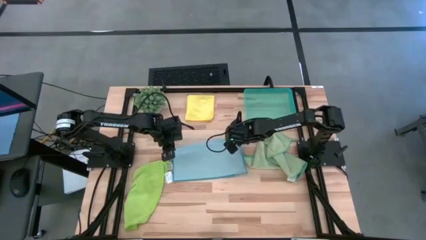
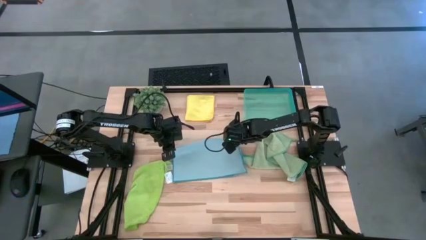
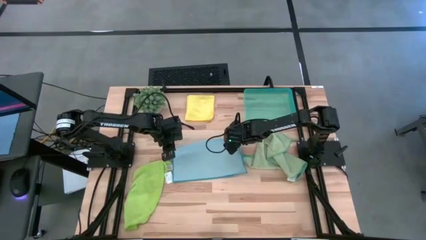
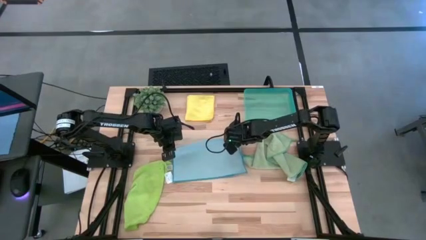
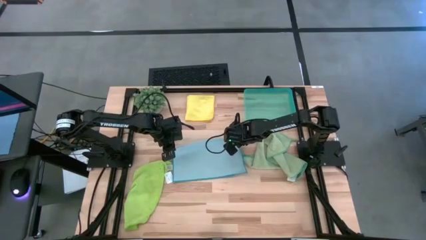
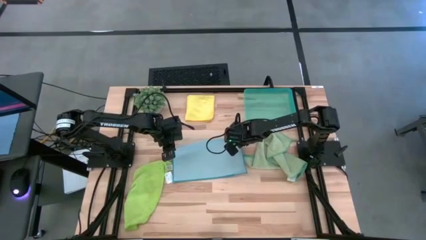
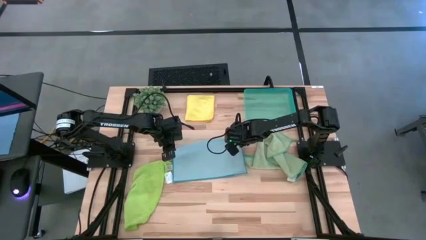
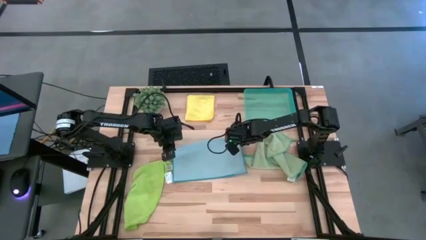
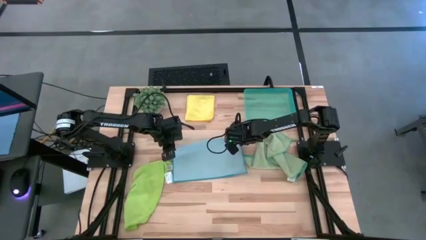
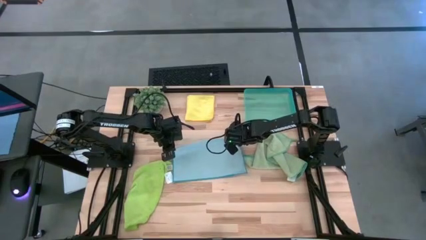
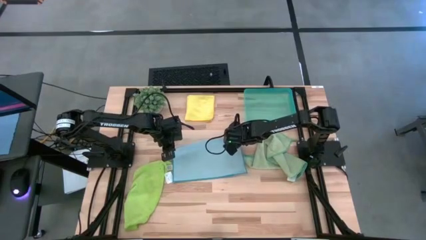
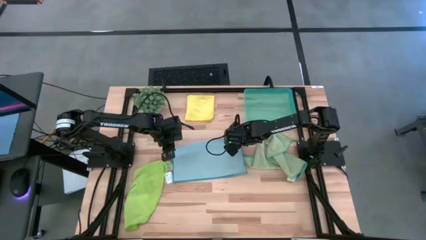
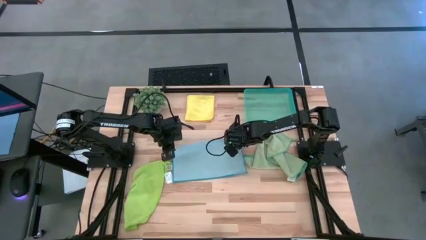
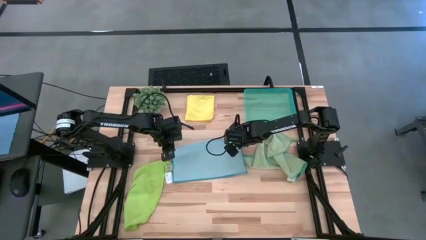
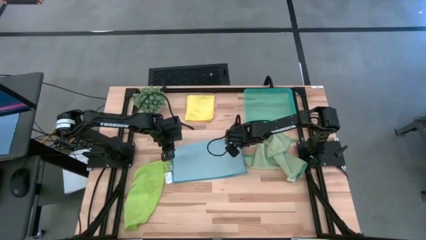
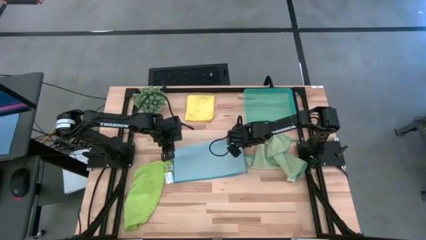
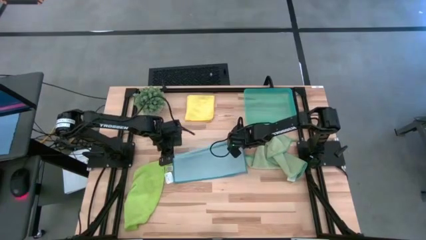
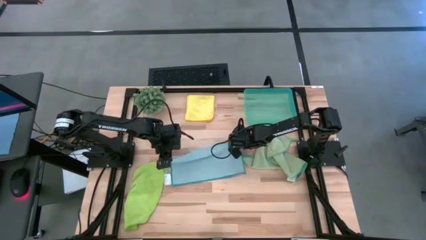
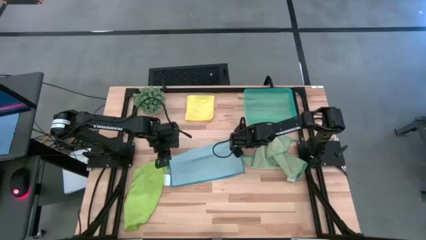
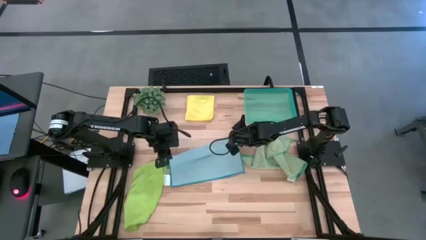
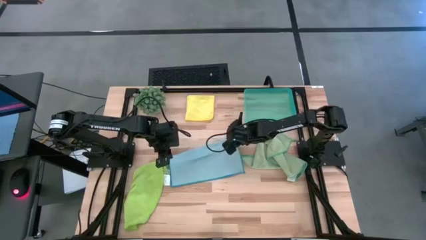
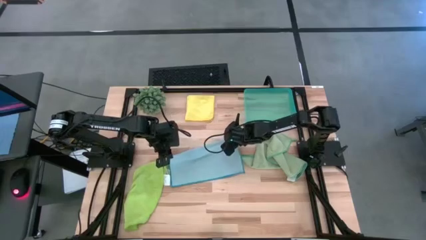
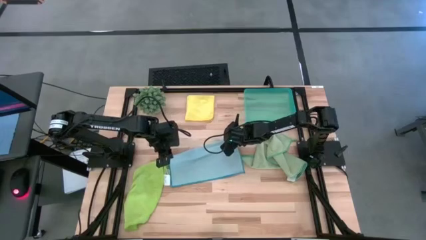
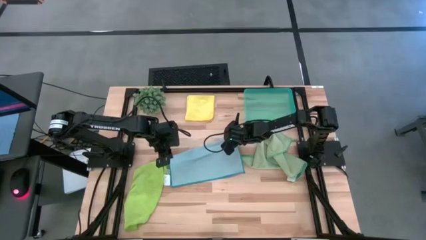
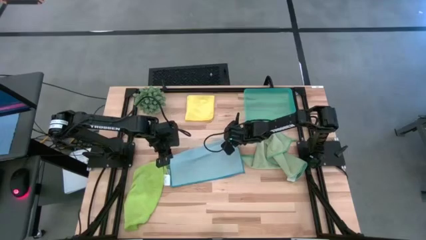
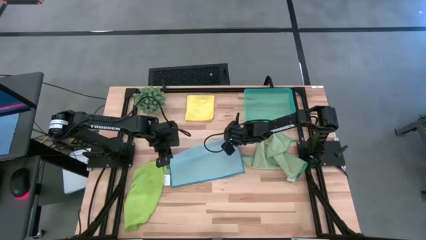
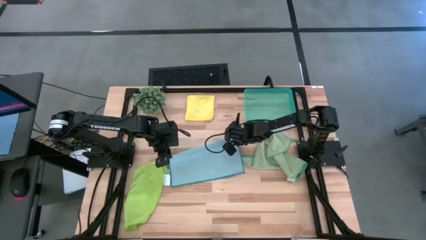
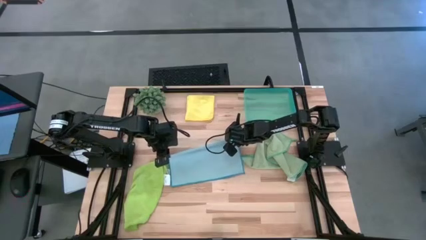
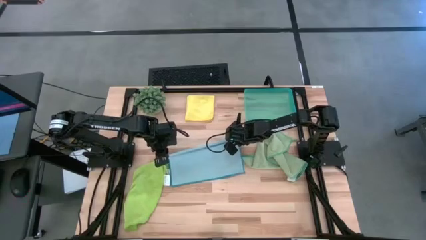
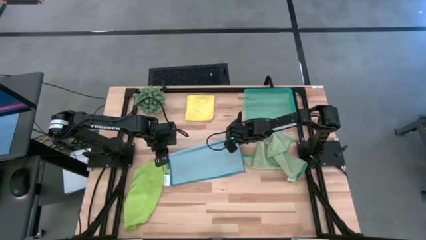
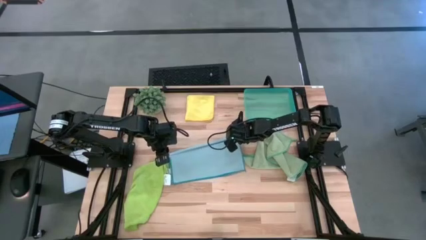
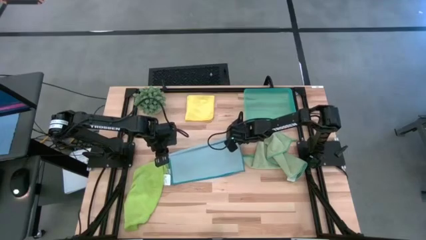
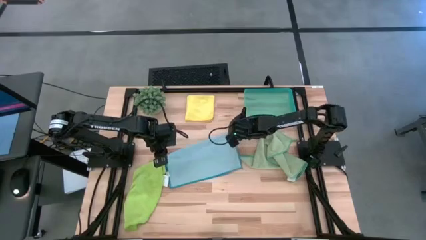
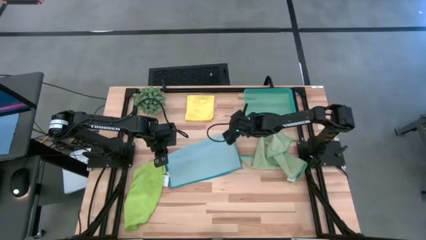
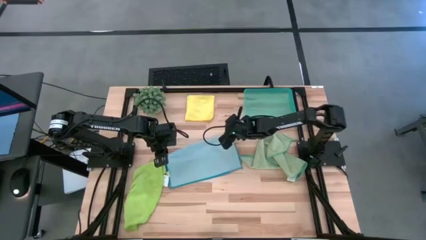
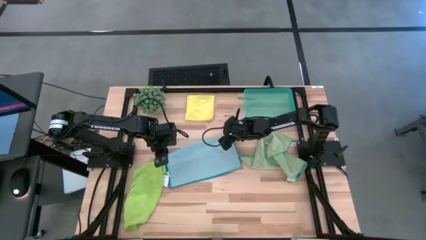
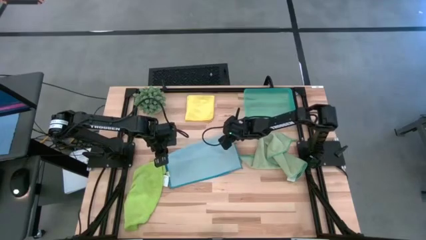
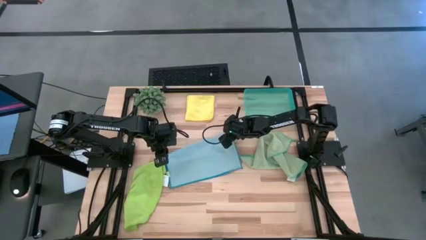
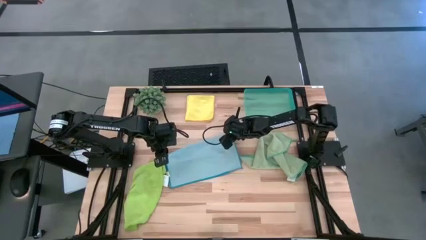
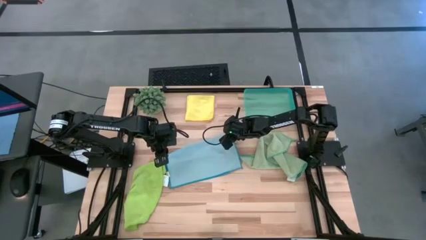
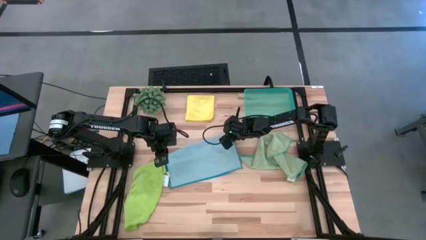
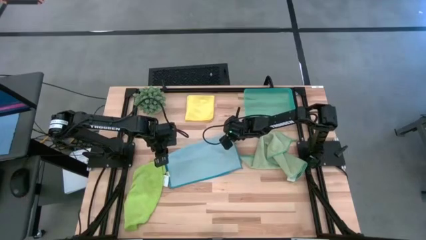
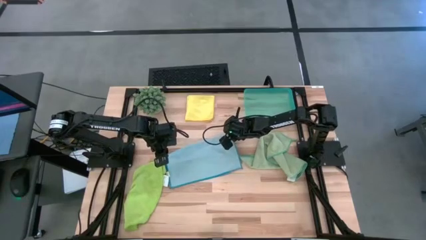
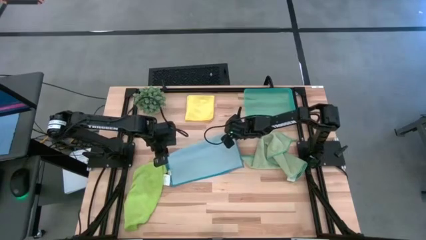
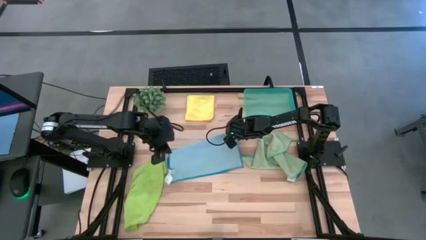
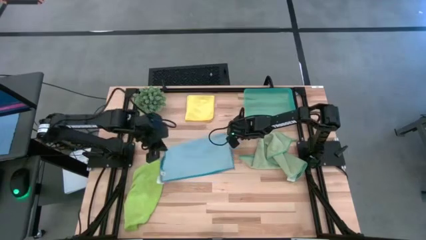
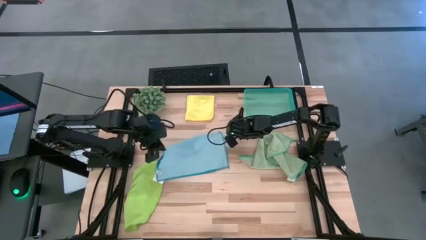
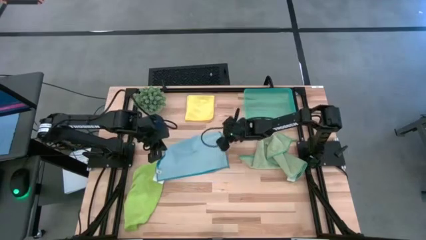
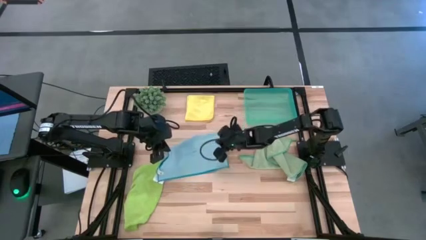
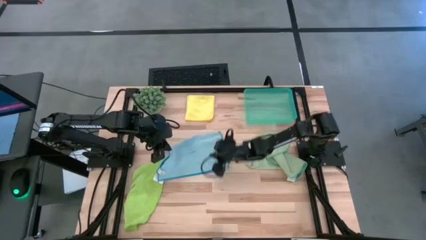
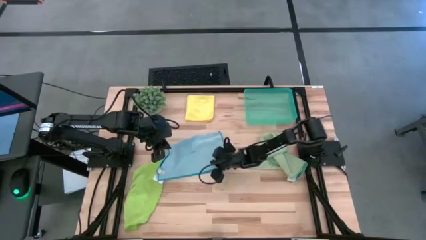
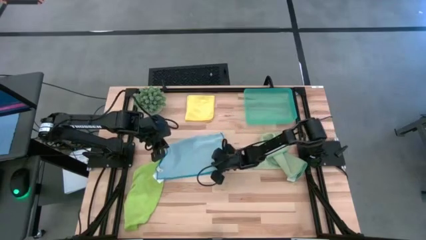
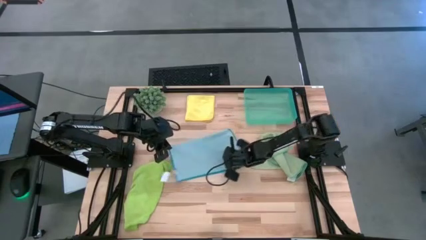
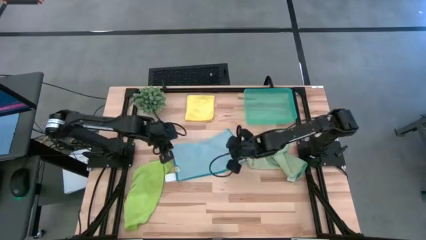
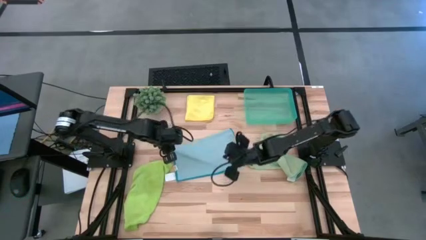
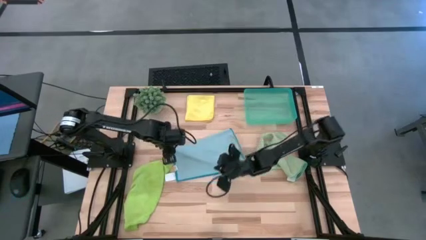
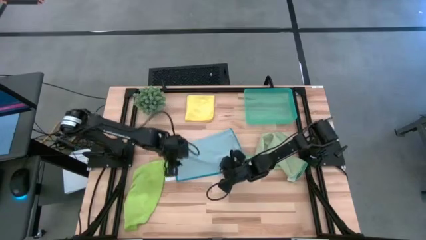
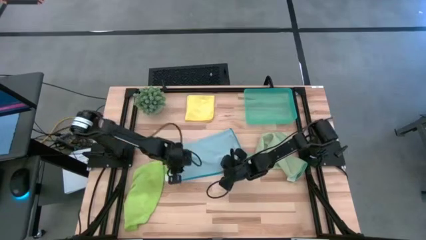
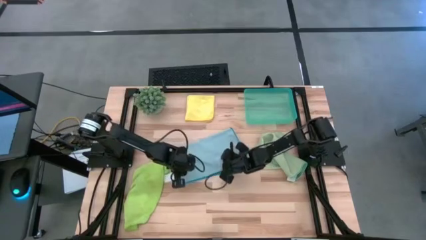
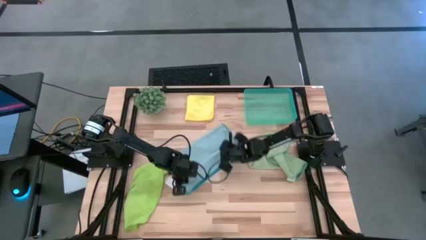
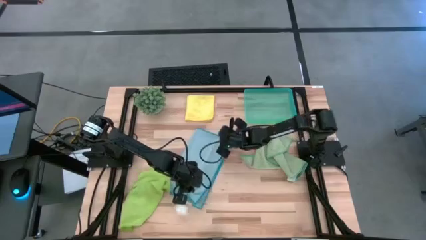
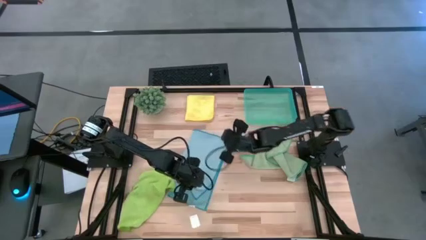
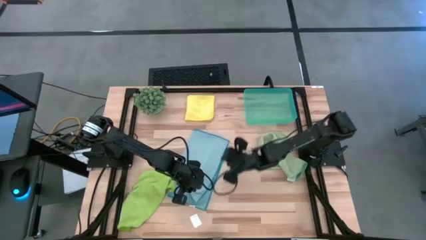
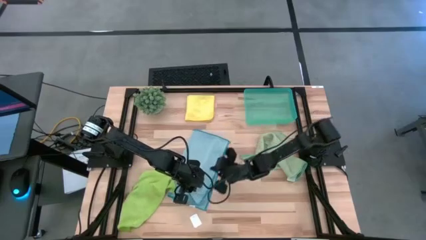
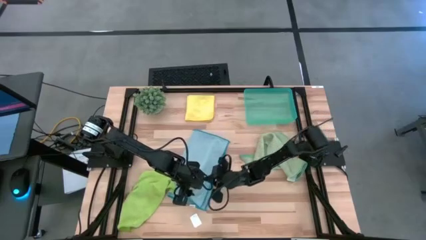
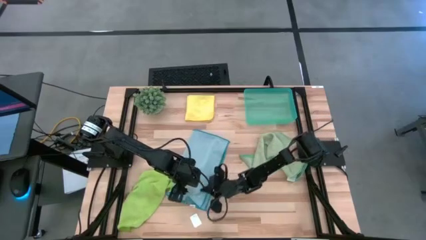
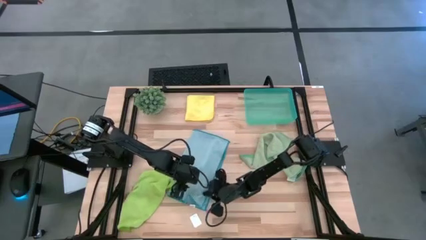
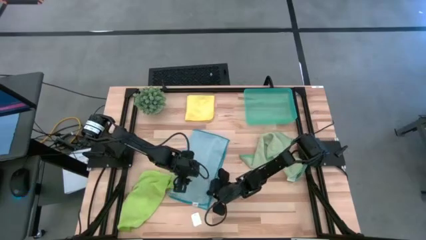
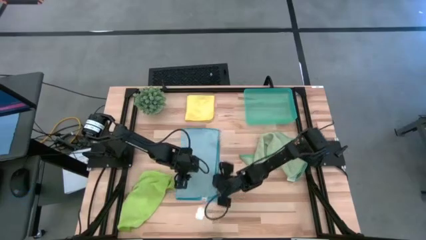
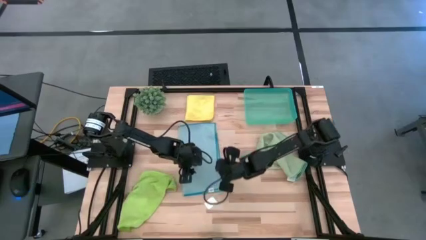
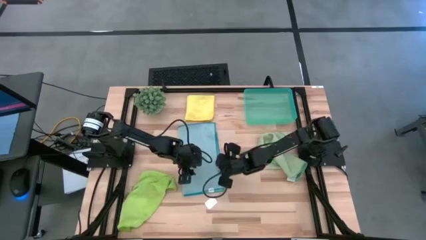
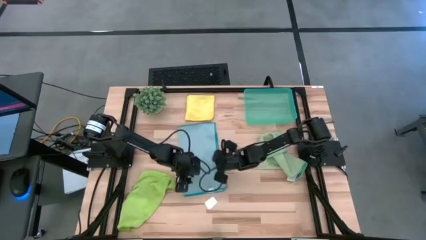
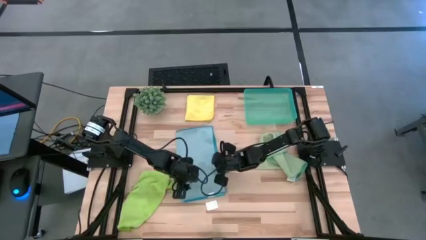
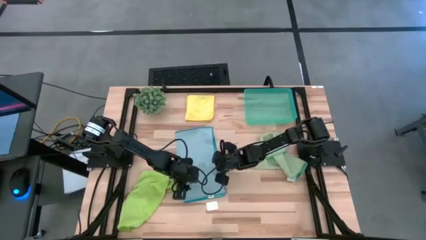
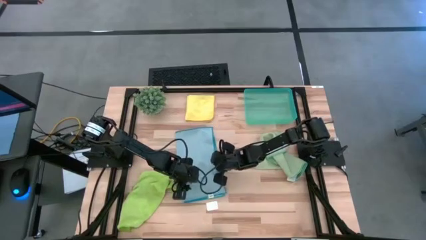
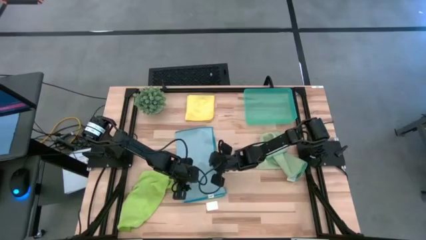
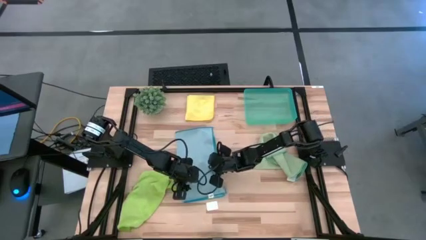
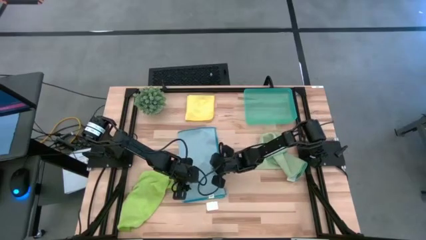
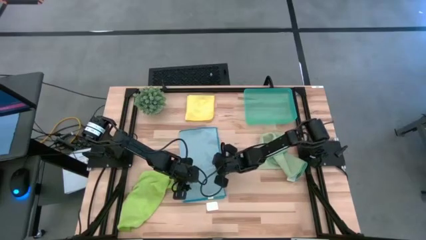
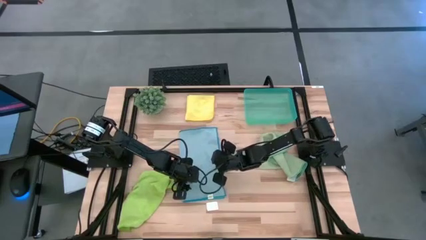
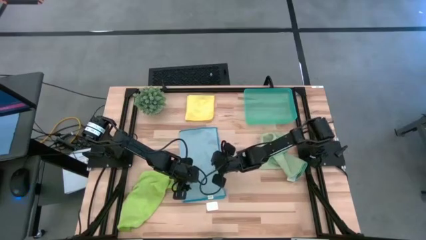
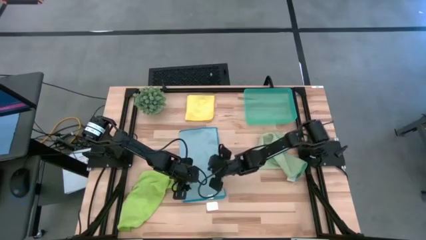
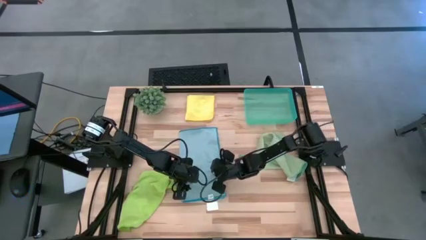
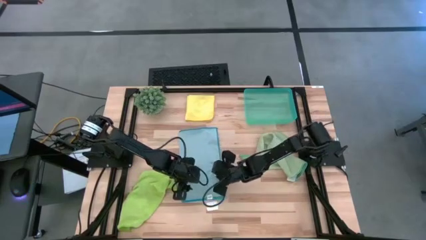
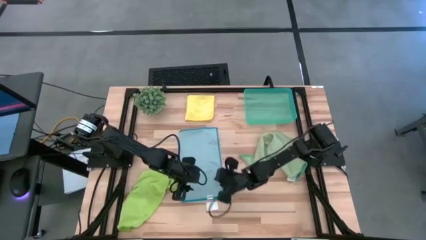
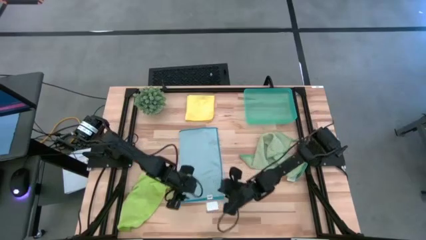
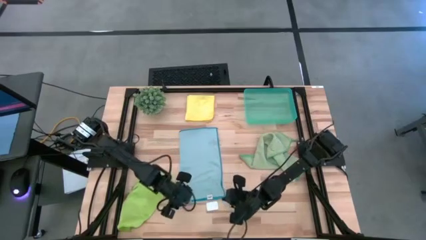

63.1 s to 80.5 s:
Task: Fold microfiber towels
Fold the blue microfiber cloth
